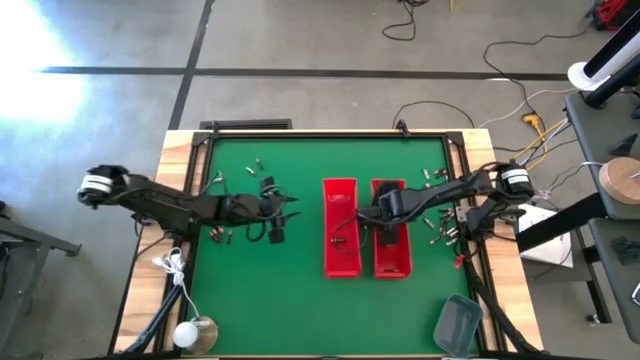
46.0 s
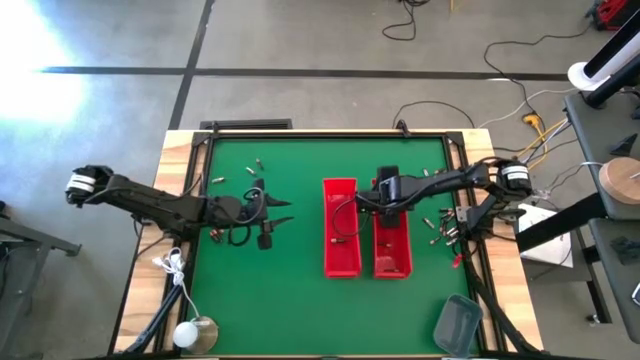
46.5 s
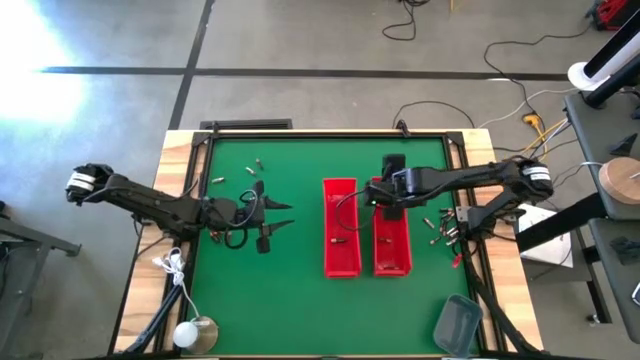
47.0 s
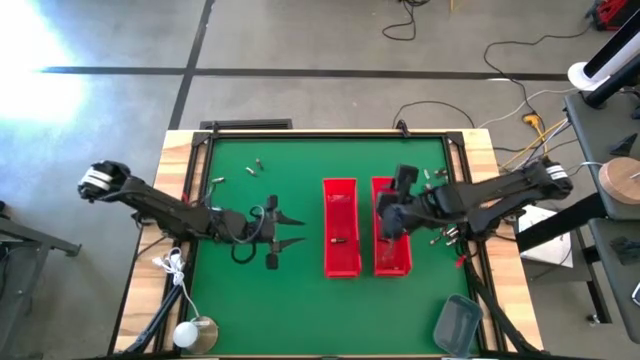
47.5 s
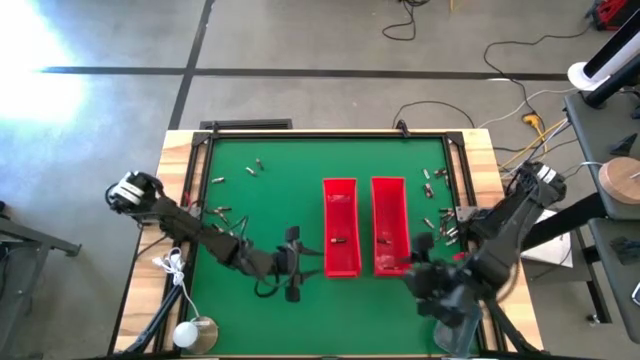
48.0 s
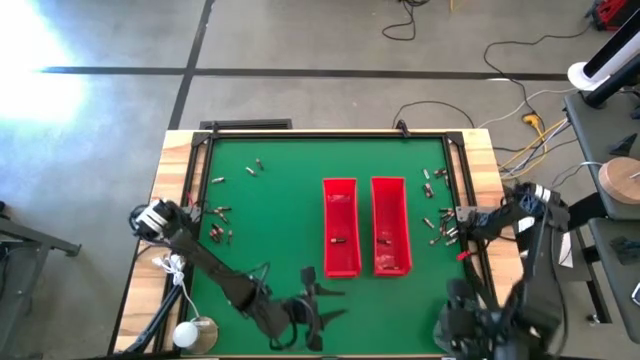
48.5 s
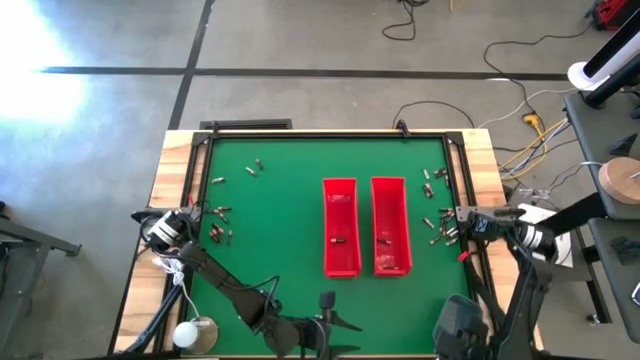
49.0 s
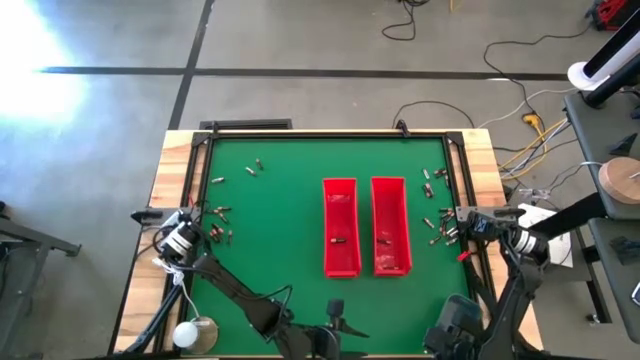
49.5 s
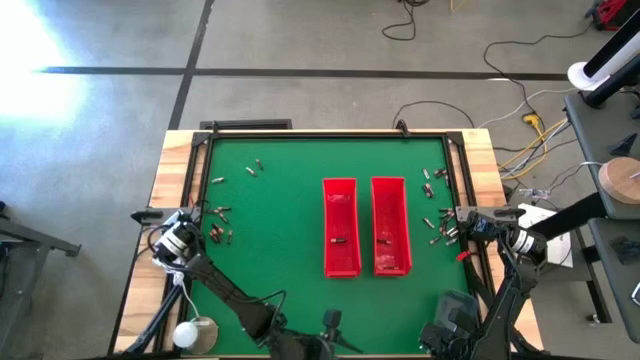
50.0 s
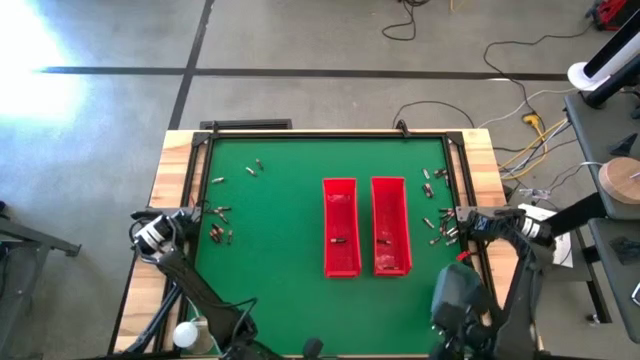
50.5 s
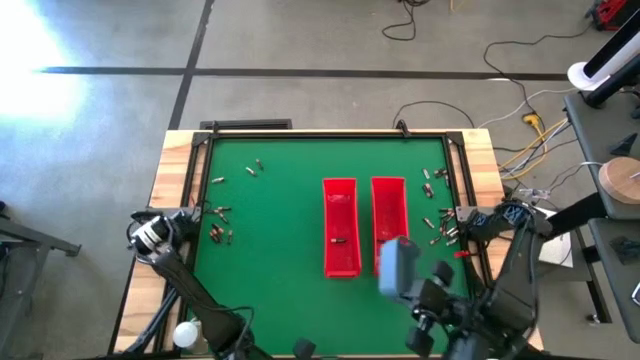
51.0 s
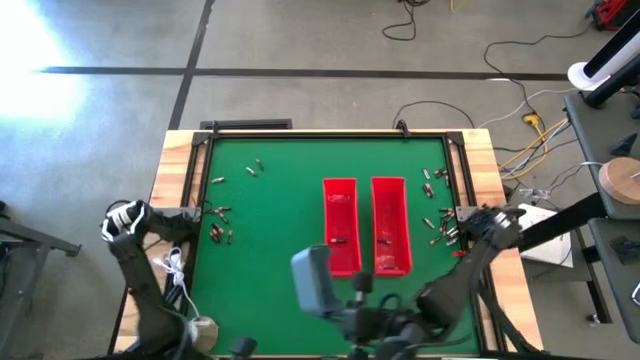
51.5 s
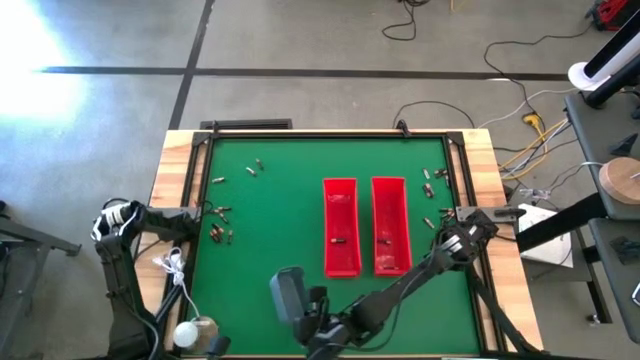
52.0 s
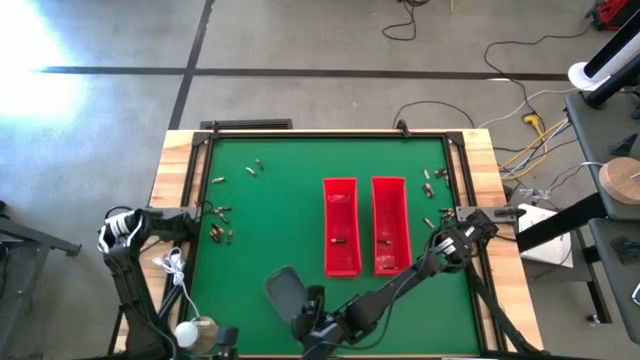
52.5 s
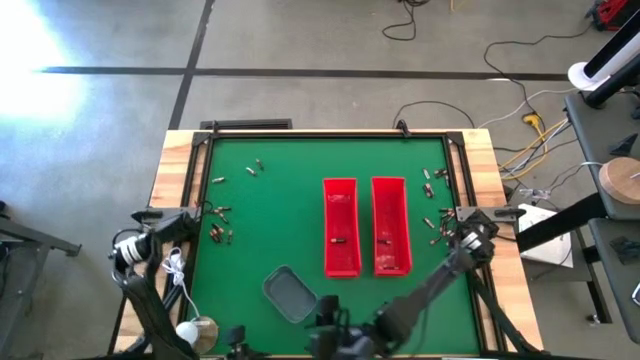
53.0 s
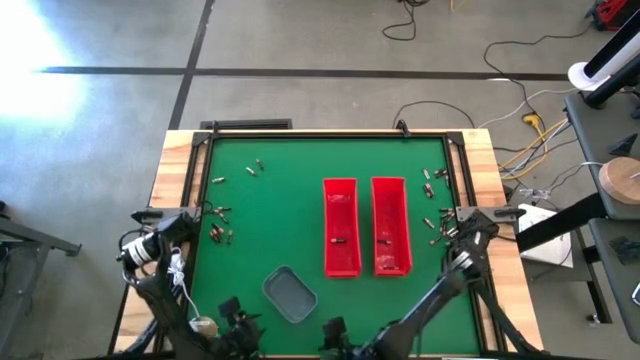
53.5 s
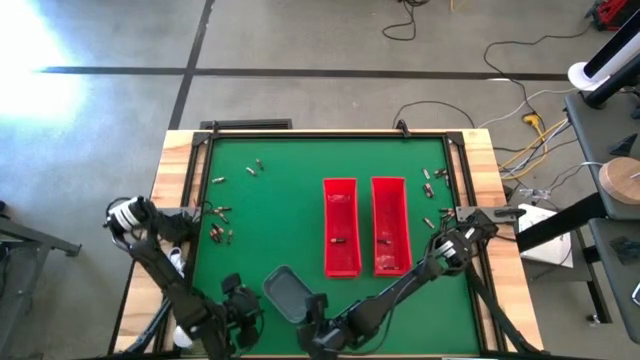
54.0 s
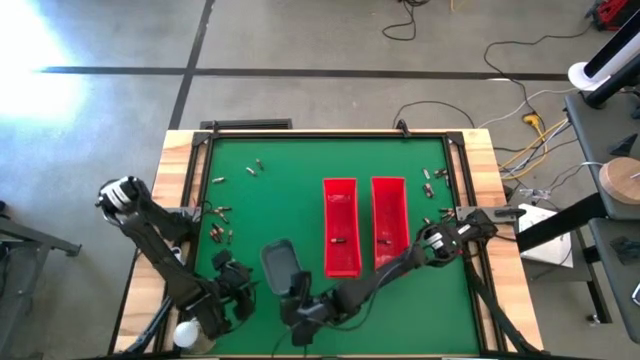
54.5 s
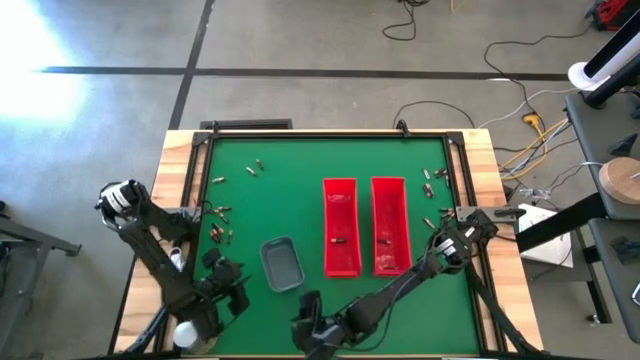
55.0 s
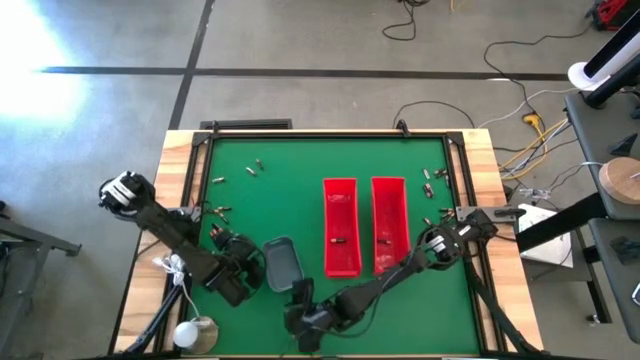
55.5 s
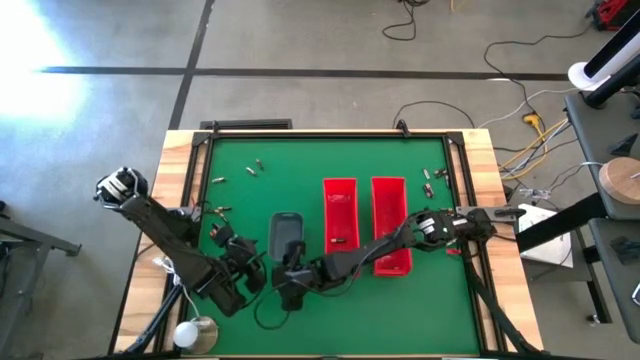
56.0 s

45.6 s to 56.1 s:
Task: Sort batteries
Move the gray bin to the middle left of the table

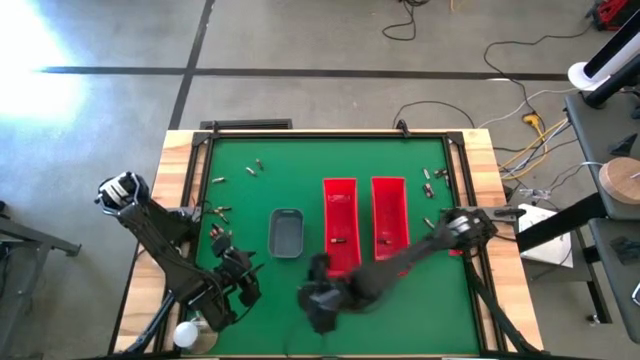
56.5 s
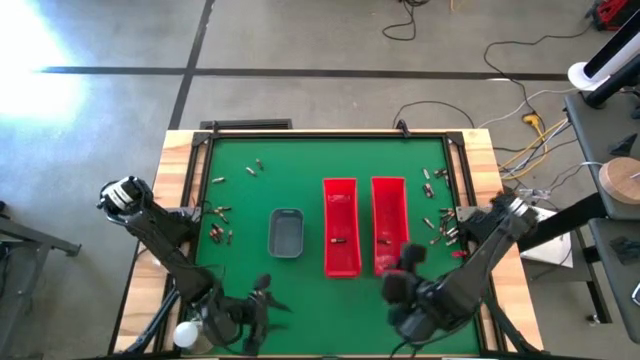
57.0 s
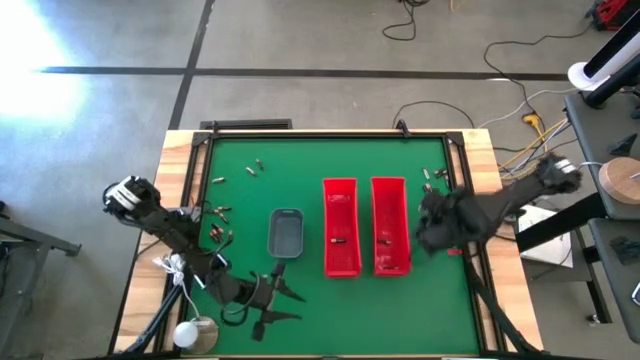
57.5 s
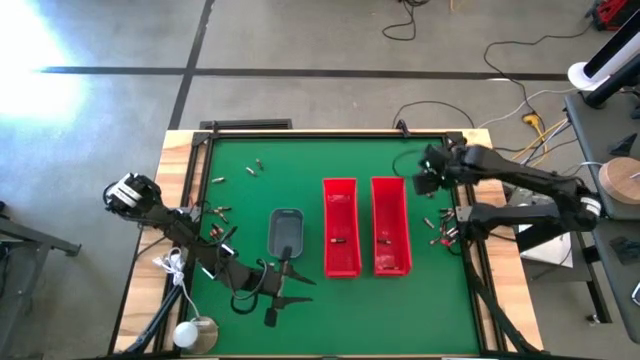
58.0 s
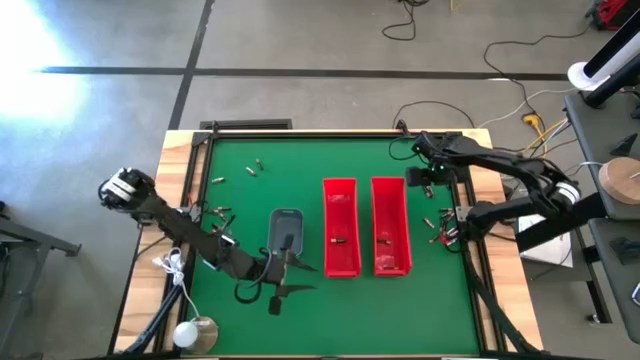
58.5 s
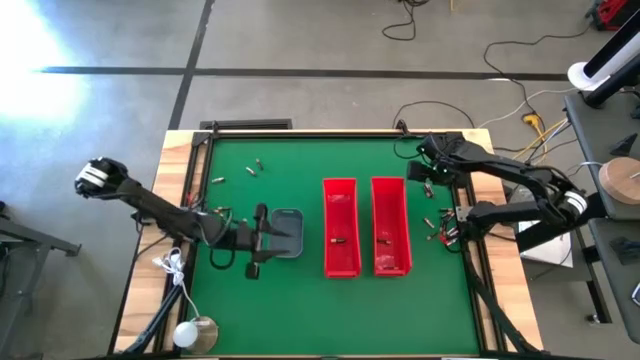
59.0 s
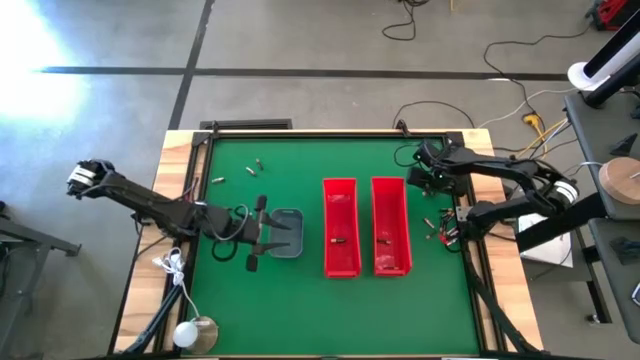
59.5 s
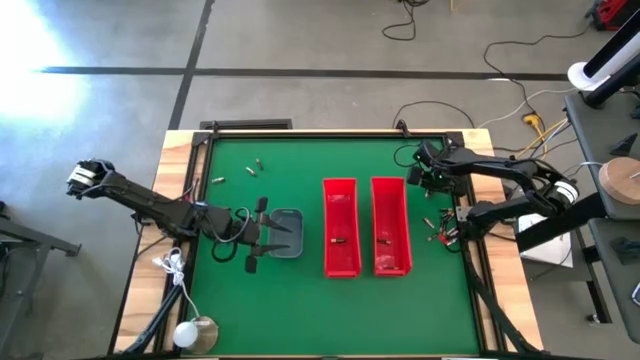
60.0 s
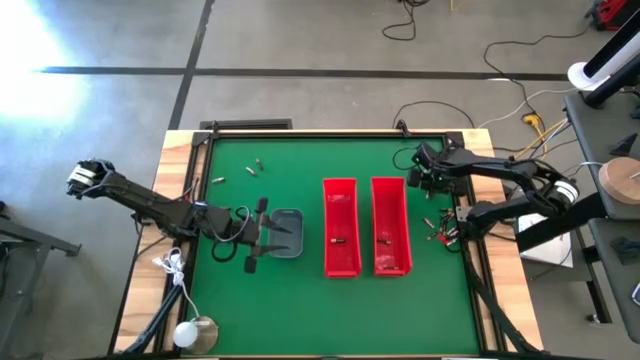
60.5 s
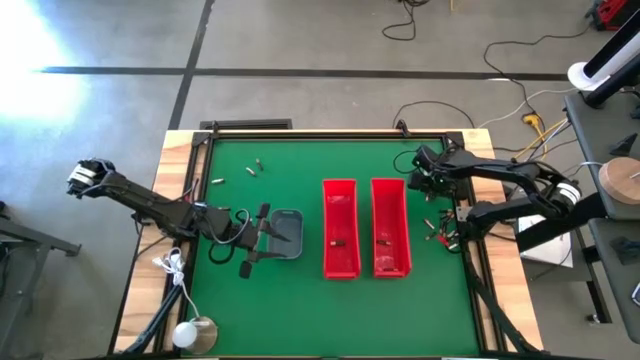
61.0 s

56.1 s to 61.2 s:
Put the big black battery into the left red bin

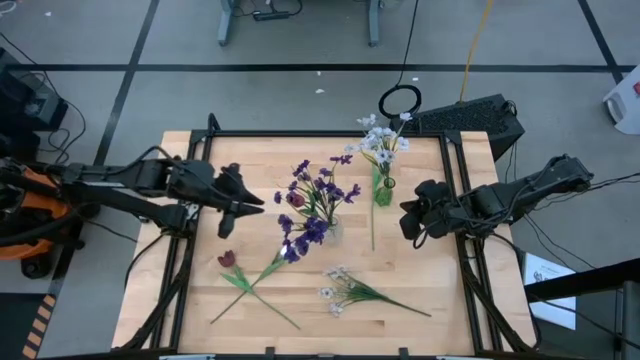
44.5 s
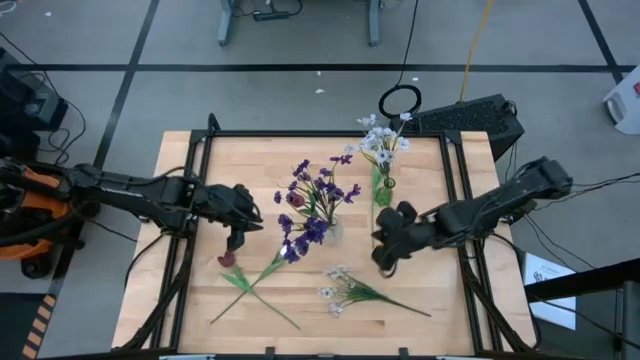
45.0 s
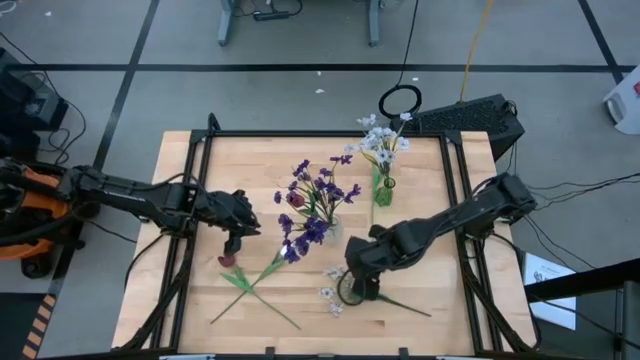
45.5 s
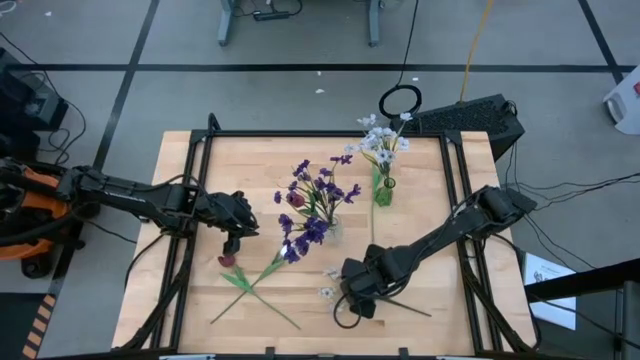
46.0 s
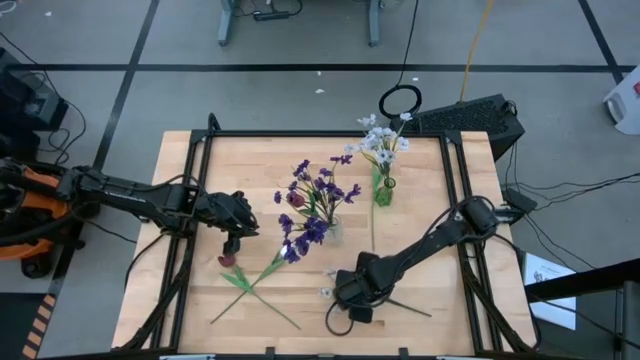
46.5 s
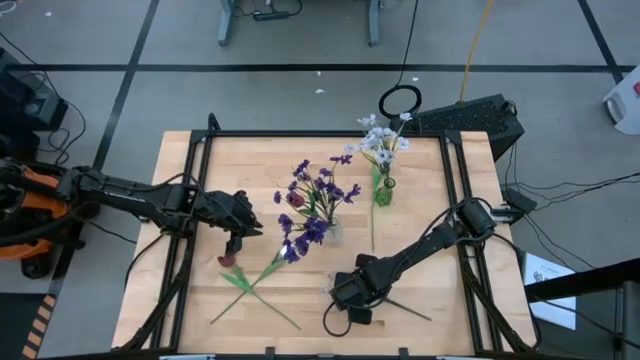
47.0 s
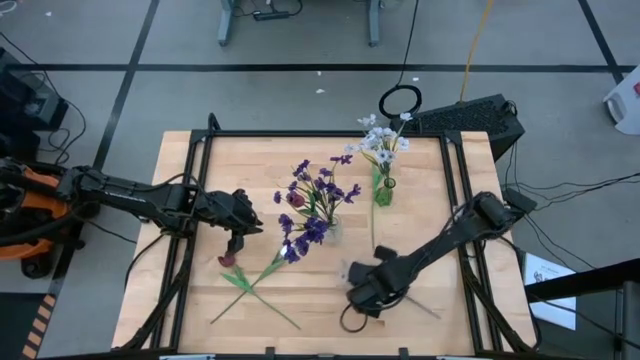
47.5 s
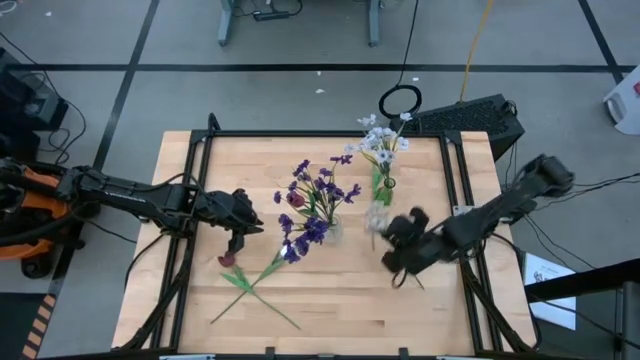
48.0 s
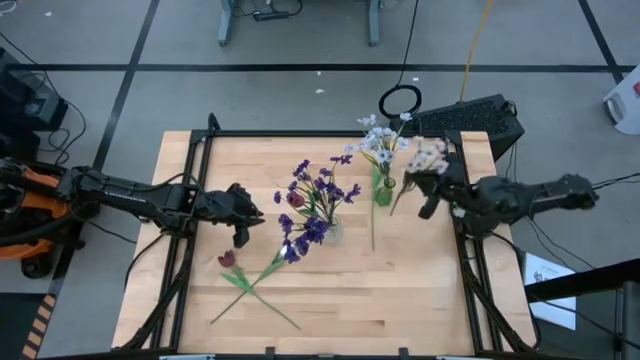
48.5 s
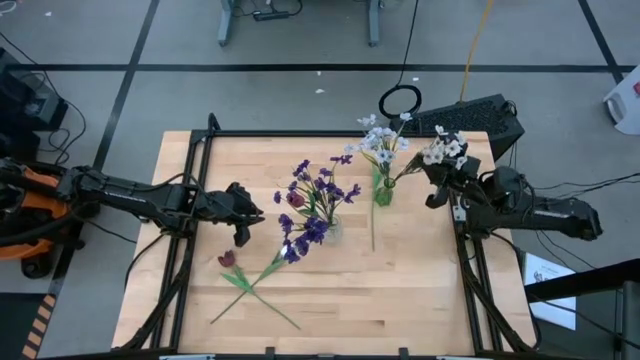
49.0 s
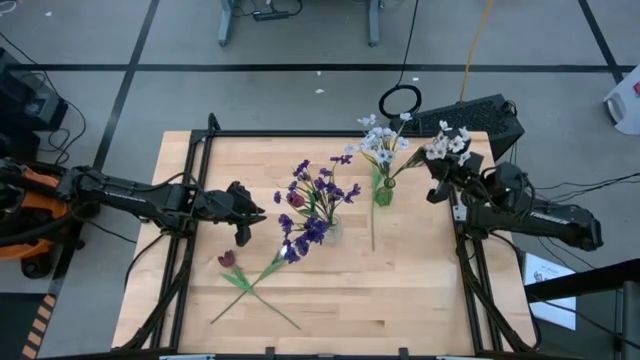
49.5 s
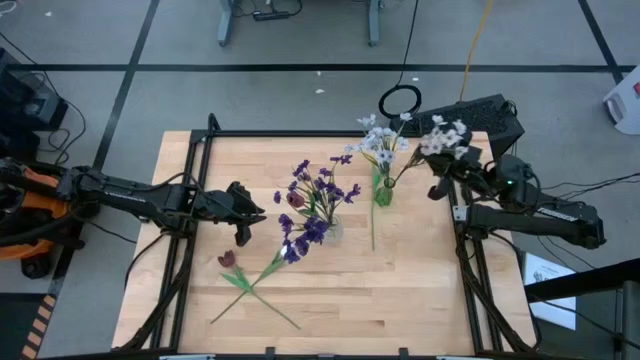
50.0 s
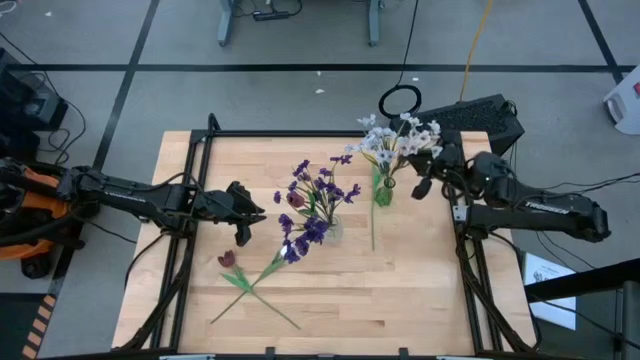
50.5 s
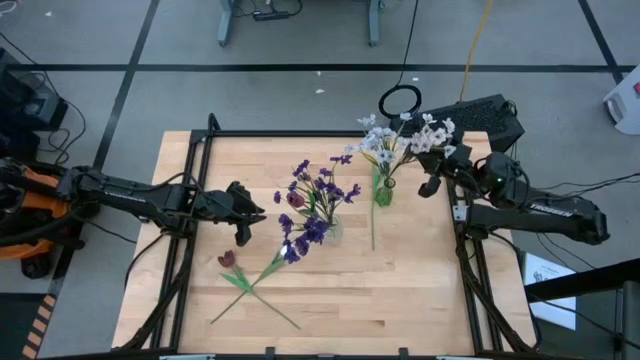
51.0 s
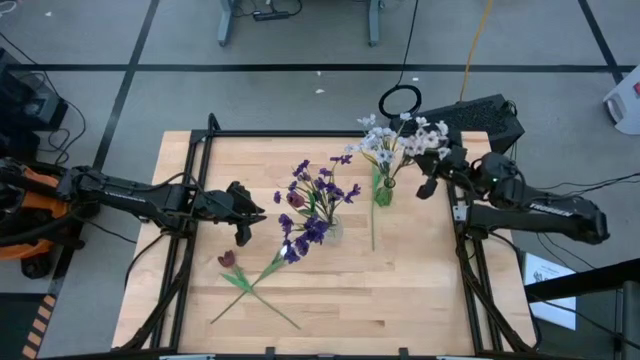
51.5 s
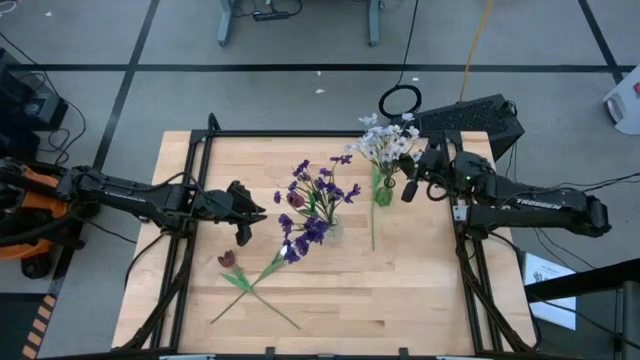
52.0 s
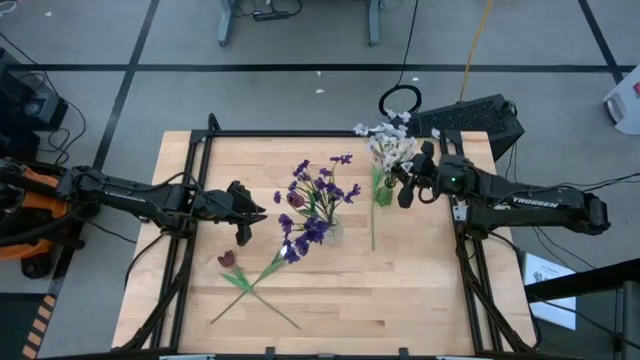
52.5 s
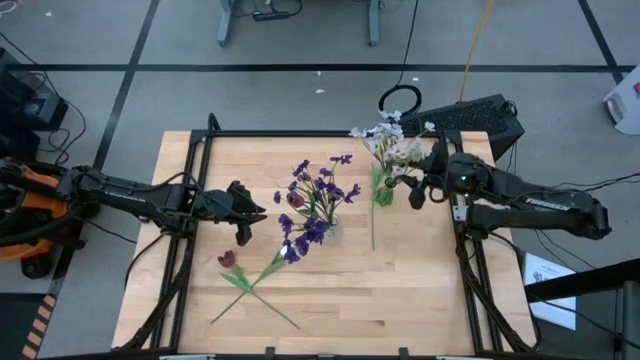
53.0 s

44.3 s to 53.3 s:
Task: Sort flowers into vase by color
Put the white flowers into the transparent green vase
